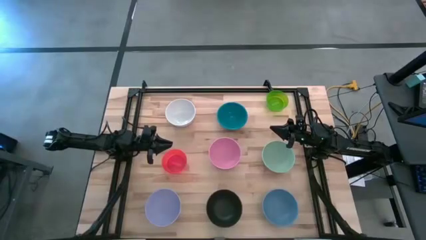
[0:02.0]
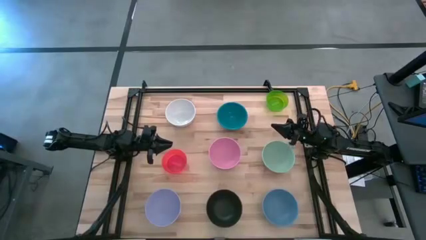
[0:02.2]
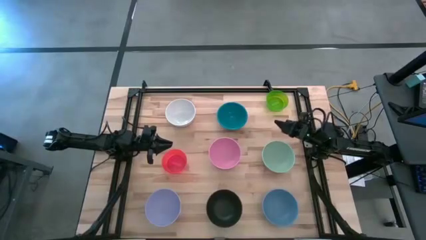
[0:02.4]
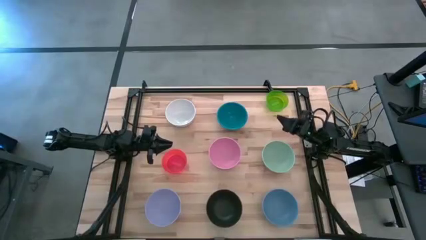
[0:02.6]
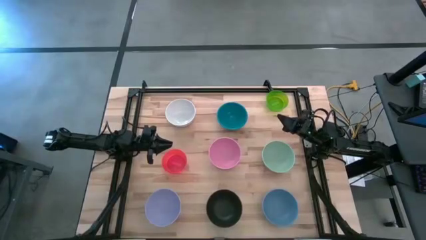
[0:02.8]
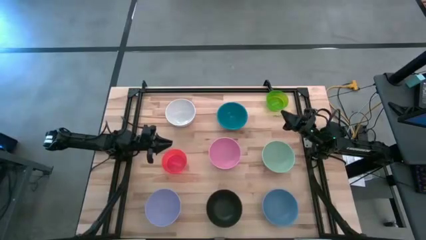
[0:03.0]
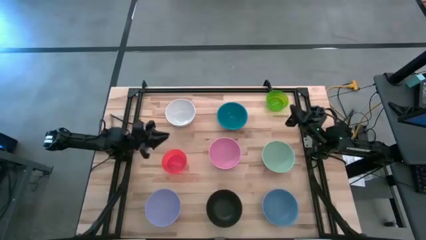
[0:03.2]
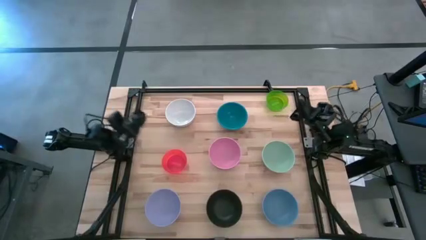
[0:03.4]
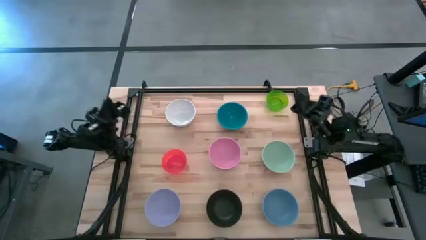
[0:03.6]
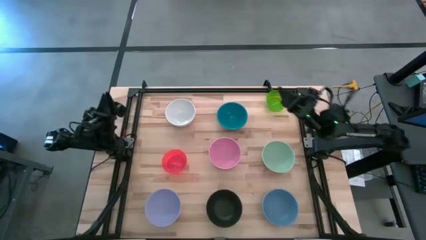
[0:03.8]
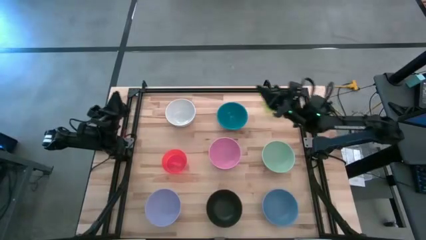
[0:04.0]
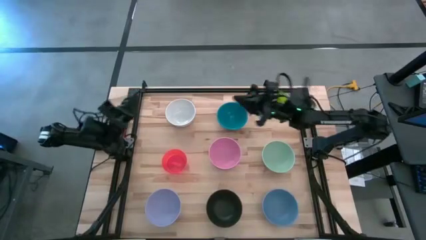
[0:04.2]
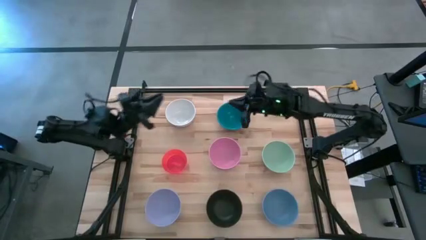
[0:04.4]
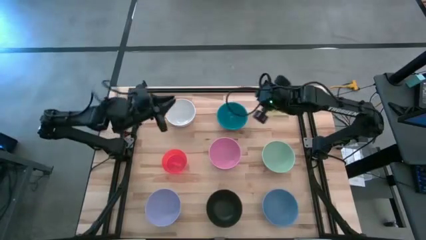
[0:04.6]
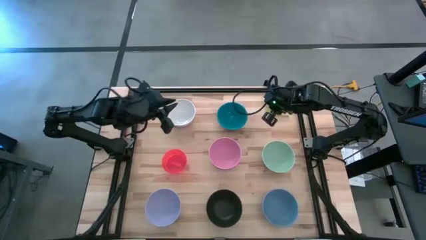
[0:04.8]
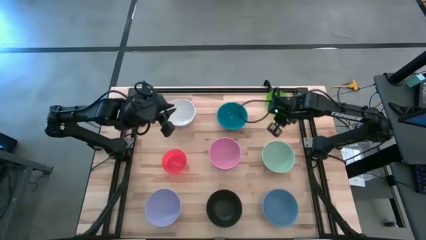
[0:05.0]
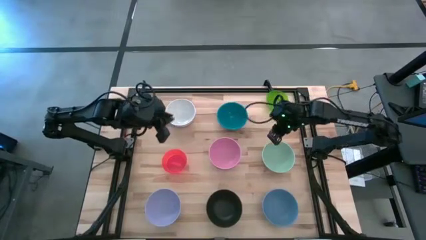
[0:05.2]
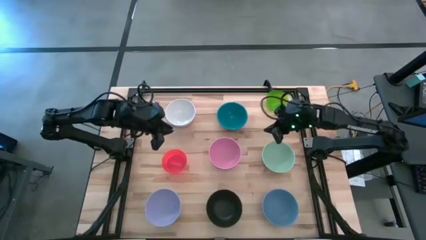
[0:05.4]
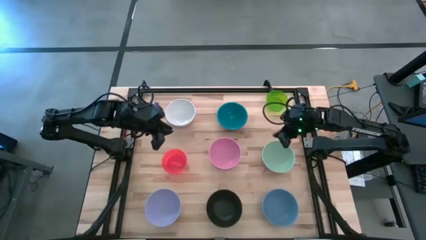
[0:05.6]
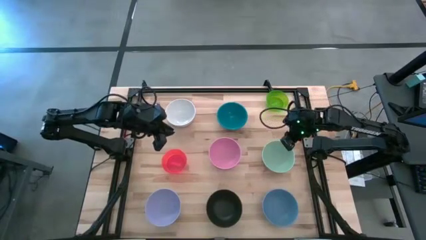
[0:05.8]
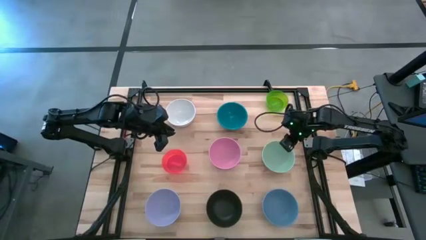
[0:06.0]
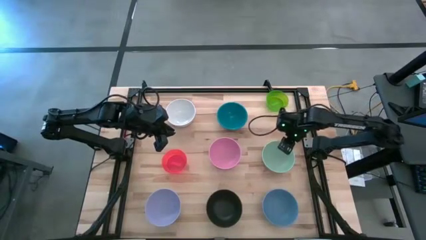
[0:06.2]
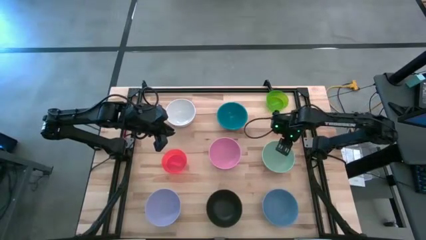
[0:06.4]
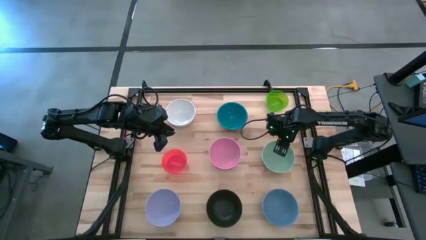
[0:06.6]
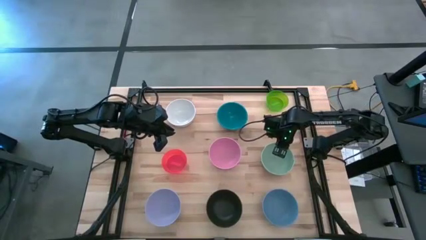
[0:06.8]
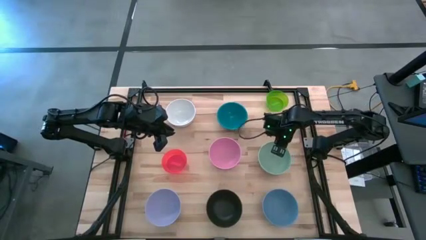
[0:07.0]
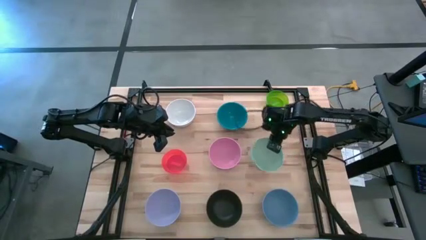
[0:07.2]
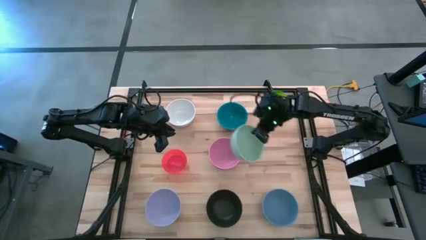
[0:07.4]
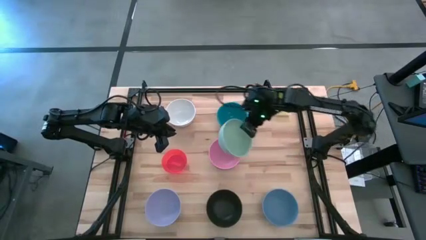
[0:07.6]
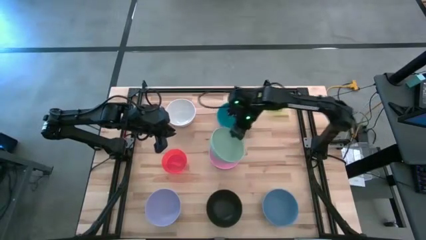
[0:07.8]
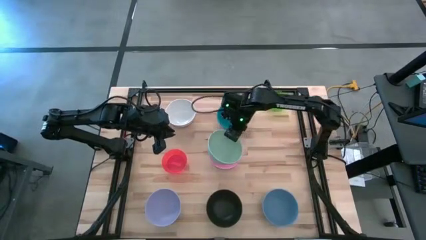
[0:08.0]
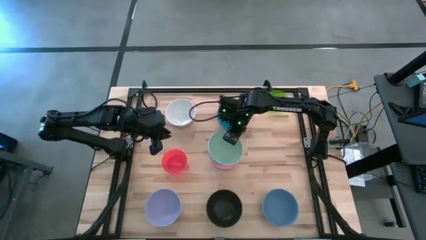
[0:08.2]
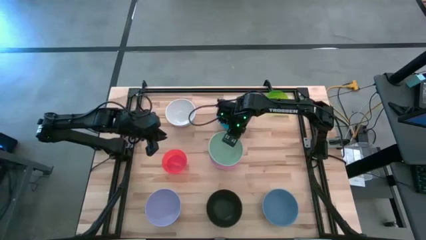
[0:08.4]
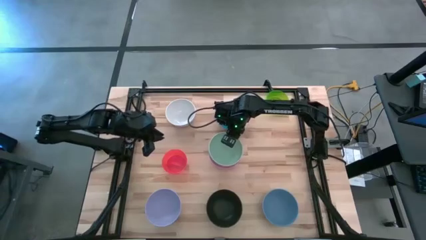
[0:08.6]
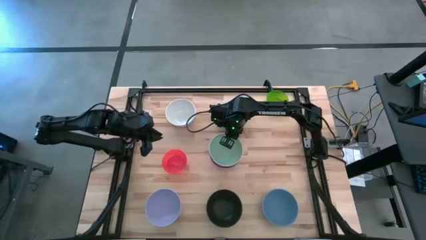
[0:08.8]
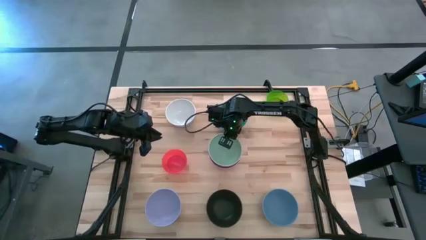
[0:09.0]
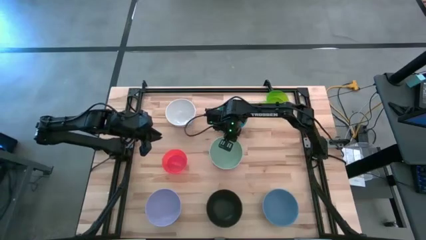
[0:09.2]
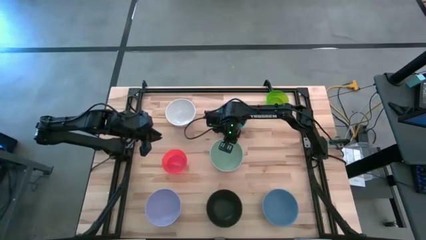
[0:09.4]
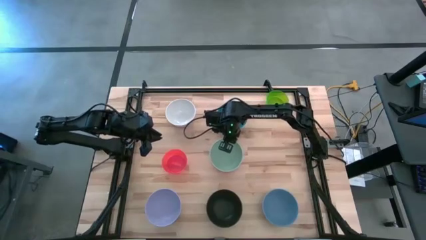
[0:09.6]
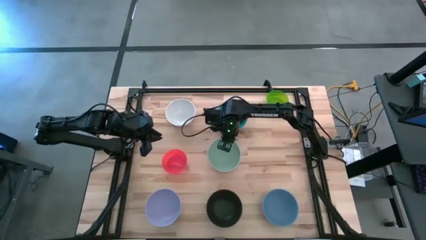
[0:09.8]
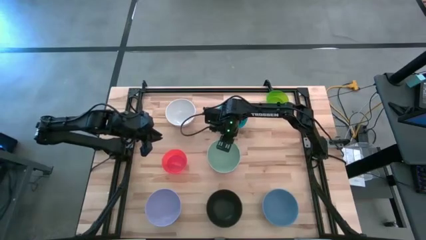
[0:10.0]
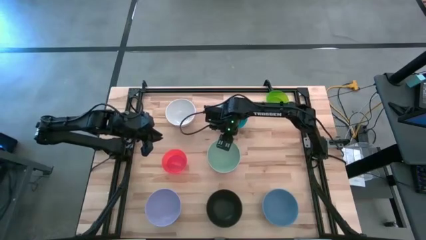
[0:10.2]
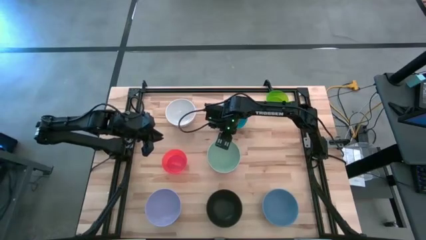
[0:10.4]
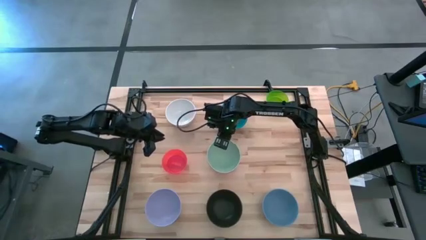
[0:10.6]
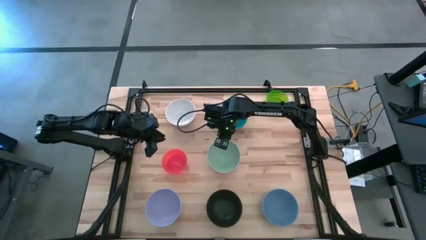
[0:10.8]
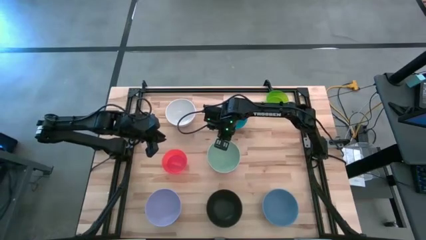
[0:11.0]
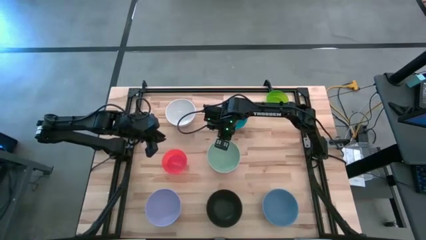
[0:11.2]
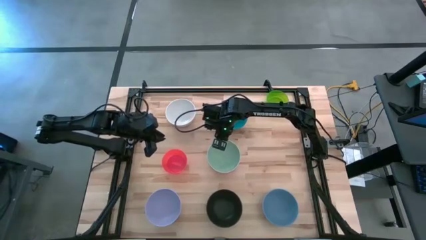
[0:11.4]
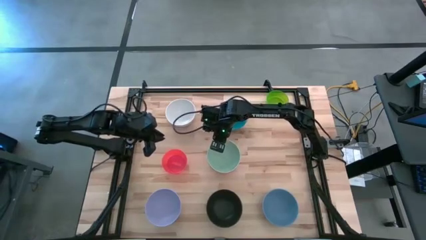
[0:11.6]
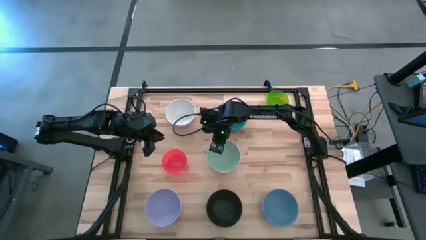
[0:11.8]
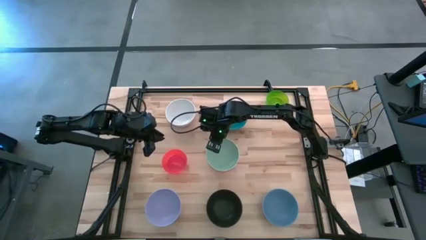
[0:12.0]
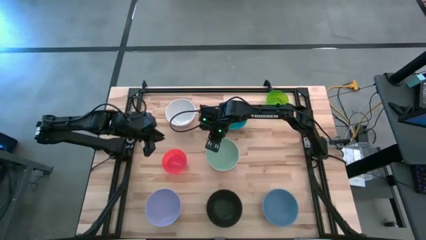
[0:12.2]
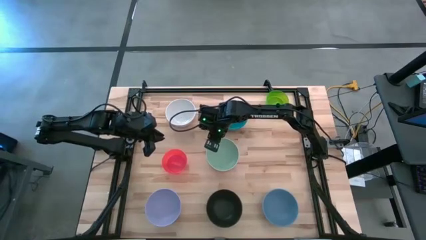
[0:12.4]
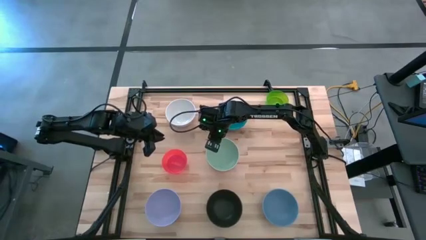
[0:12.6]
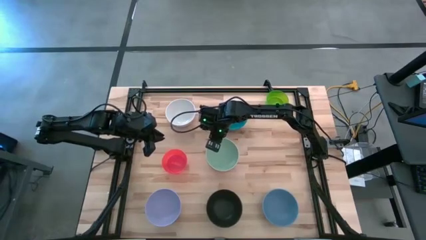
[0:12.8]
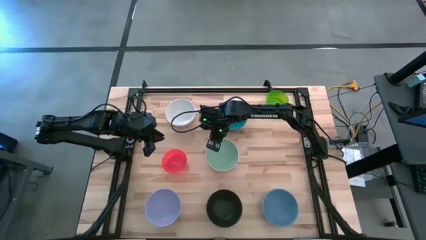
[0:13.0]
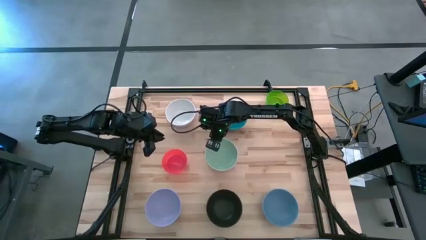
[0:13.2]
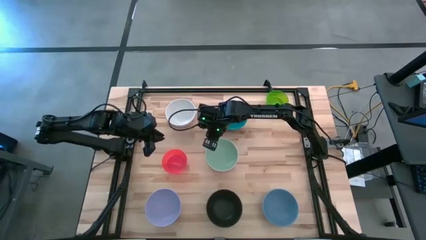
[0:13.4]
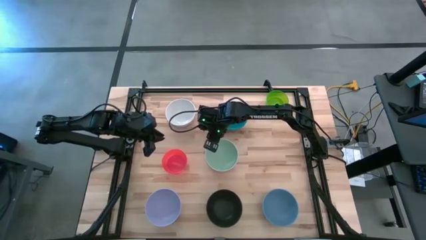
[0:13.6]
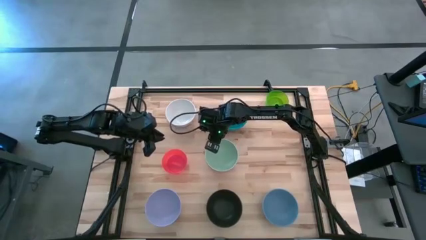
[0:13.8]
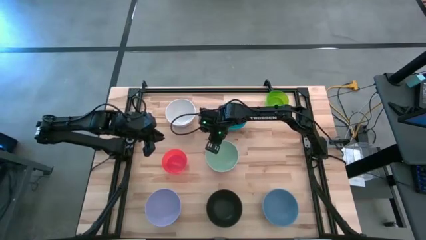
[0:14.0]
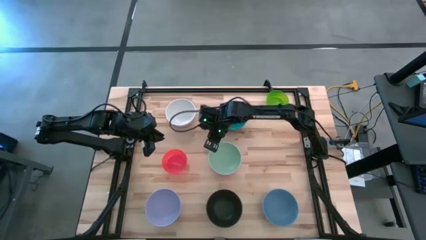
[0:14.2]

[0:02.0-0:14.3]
Task: Nest bowls inside each other
Stack the light green bowl on the pink bowl

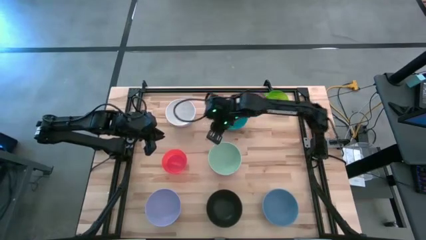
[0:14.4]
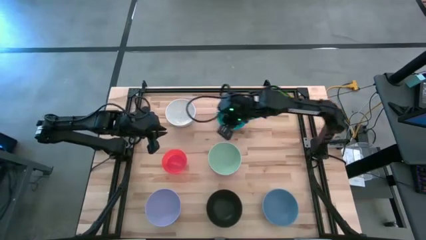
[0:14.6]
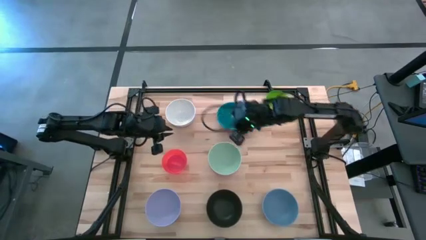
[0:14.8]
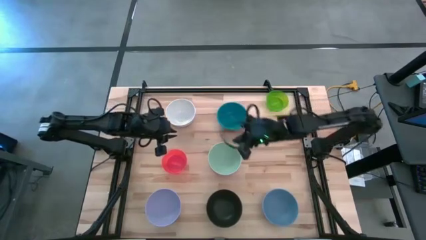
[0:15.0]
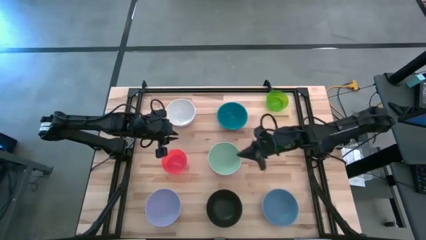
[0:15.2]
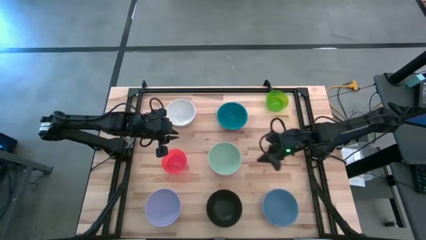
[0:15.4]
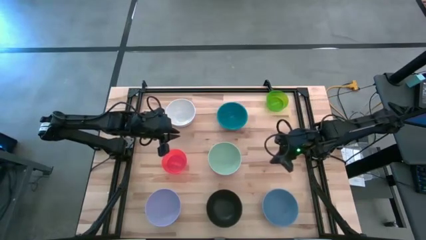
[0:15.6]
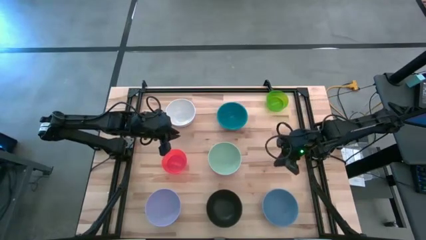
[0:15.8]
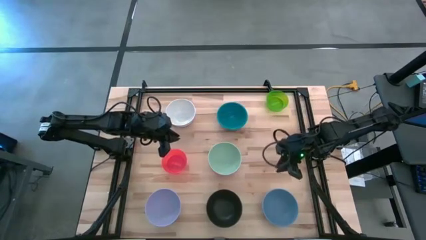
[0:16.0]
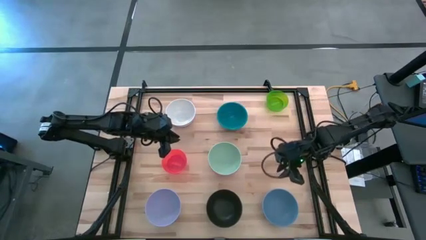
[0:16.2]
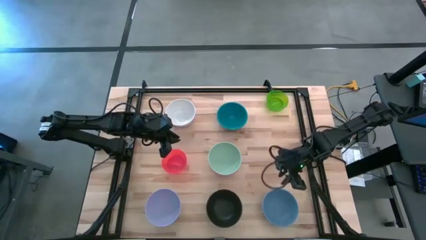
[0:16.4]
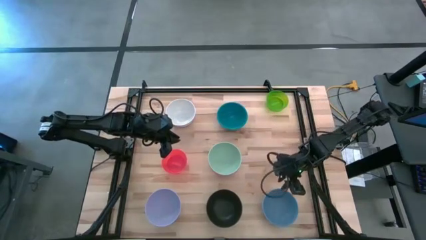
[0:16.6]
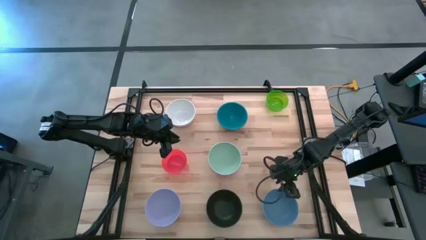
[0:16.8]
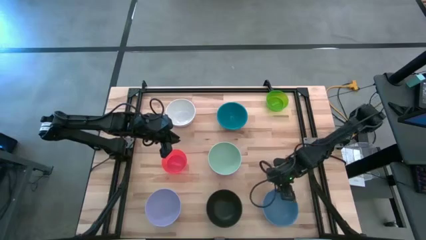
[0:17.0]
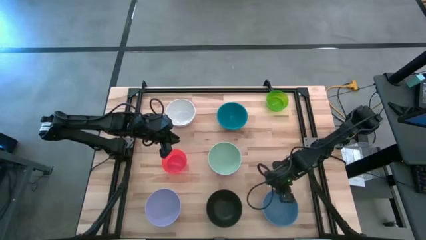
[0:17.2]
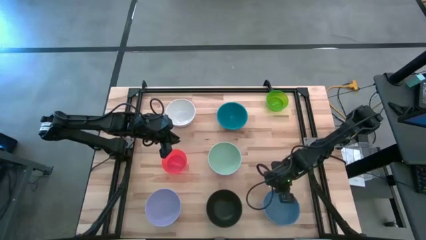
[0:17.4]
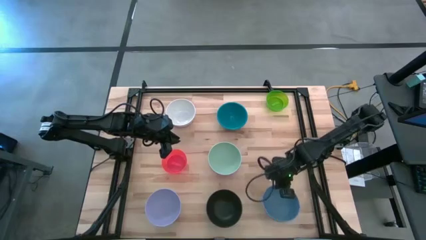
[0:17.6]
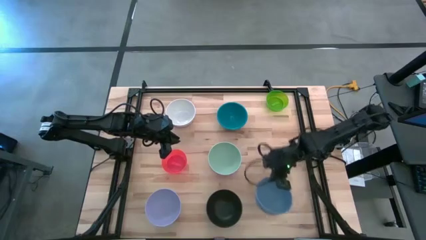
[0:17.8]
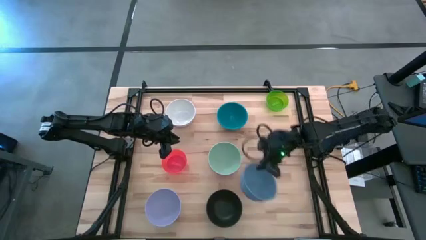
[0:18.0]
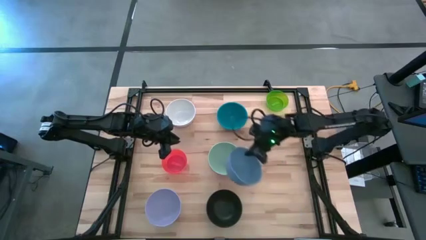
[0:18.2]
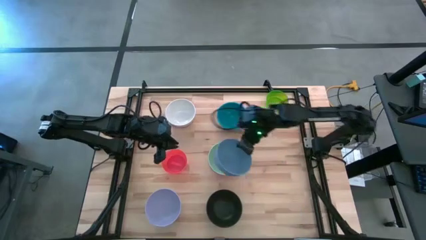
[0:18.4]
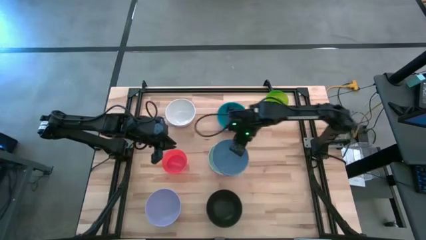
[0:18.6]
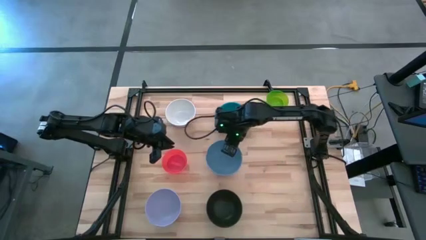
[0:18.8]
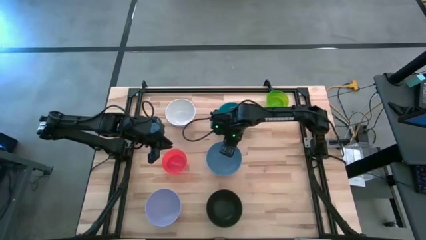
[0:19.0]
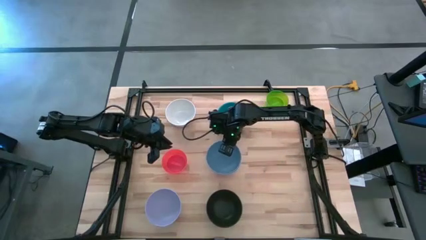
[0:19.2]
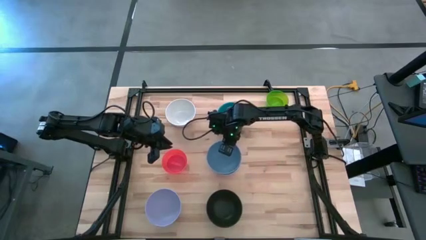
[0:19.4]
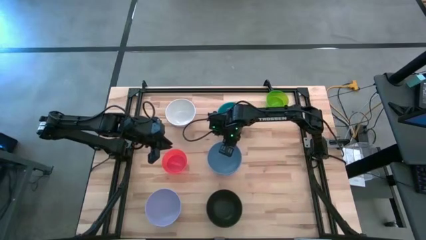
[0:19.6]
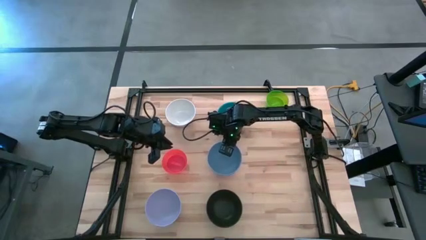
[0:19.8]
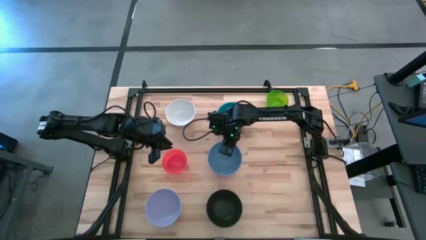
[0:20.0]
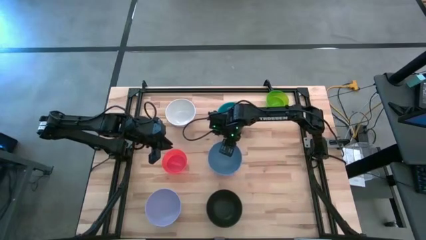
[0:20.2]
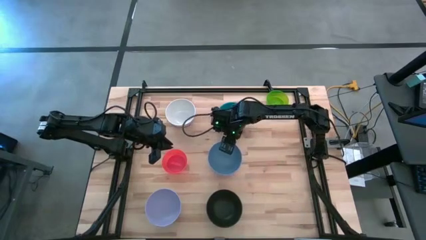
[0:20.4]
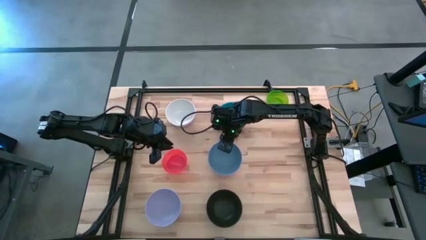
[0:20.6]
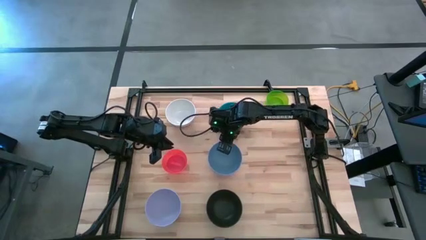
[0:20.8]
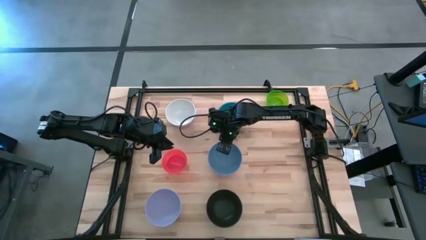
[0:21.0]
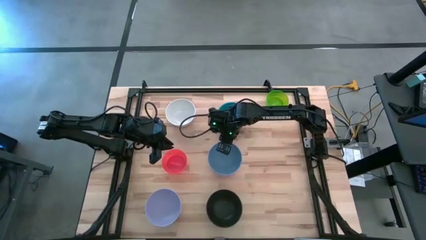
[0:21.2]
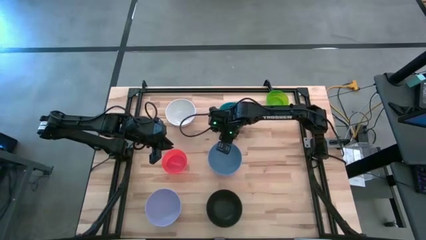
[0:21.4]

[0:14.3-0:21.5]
Stack the blue bowl on top of the light green bowl
